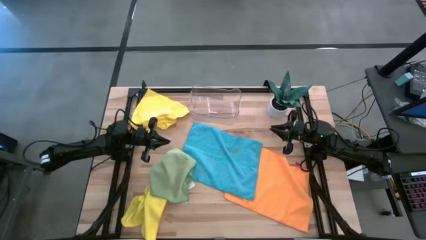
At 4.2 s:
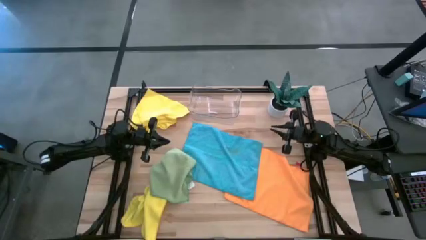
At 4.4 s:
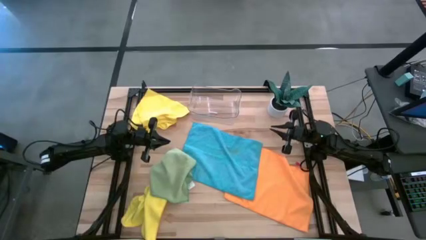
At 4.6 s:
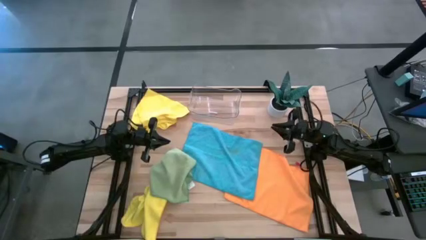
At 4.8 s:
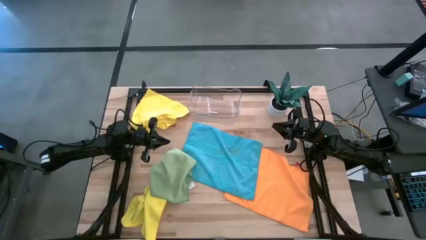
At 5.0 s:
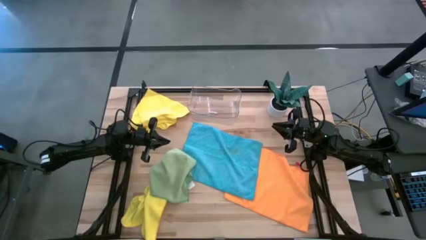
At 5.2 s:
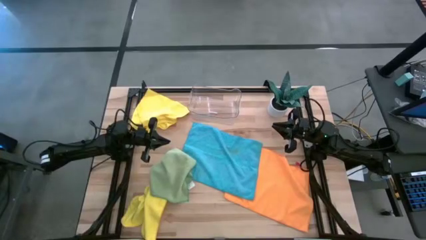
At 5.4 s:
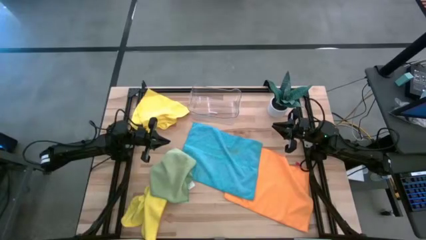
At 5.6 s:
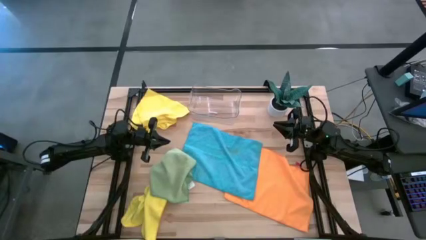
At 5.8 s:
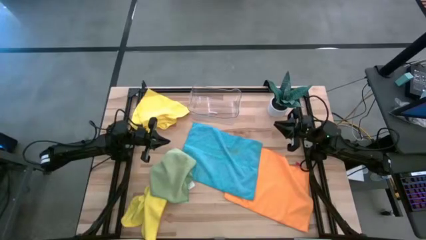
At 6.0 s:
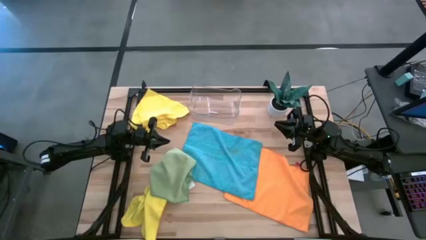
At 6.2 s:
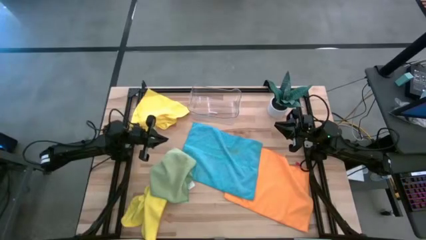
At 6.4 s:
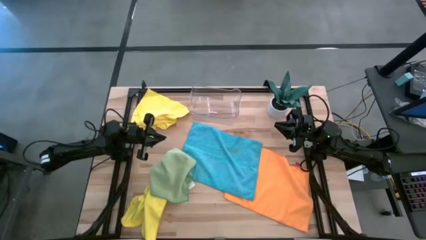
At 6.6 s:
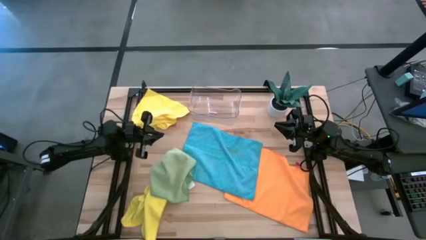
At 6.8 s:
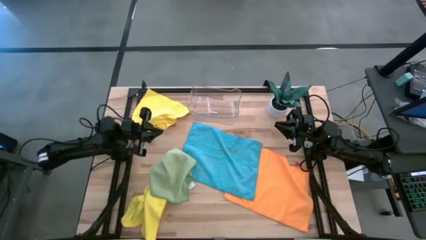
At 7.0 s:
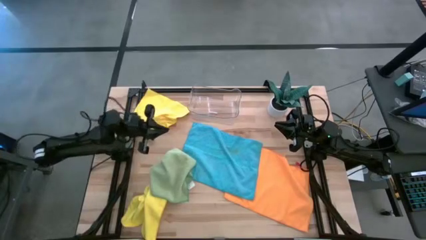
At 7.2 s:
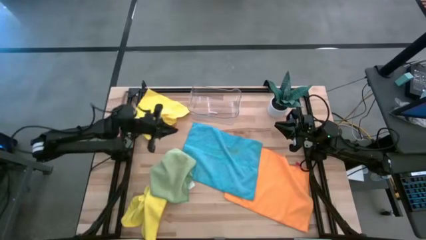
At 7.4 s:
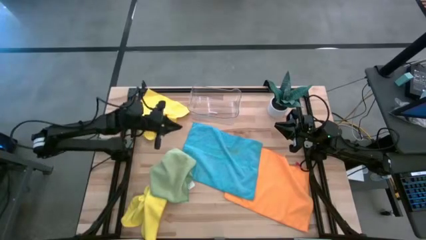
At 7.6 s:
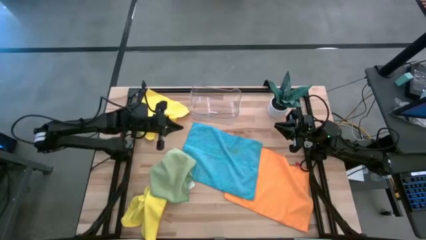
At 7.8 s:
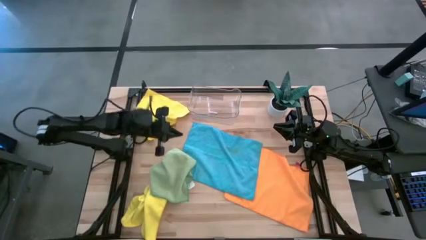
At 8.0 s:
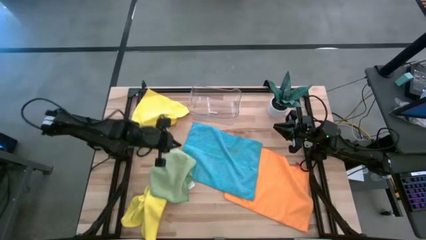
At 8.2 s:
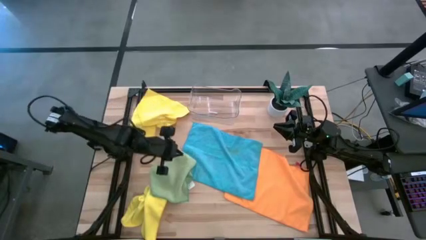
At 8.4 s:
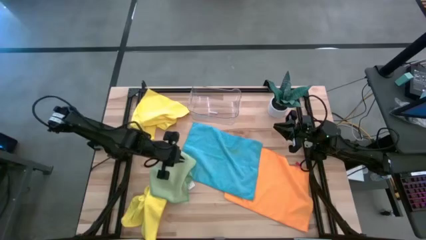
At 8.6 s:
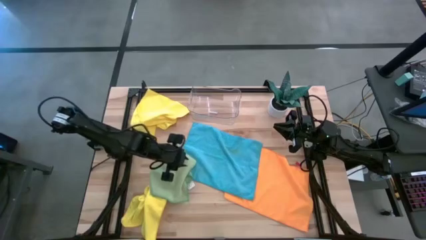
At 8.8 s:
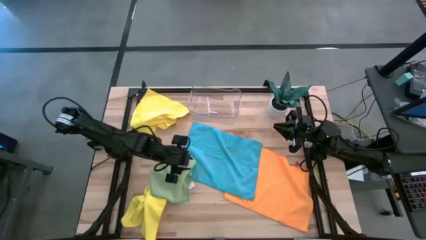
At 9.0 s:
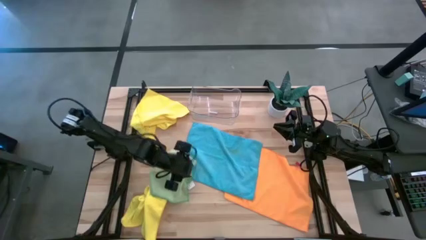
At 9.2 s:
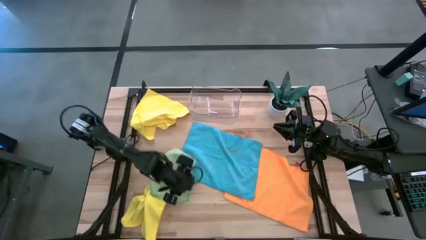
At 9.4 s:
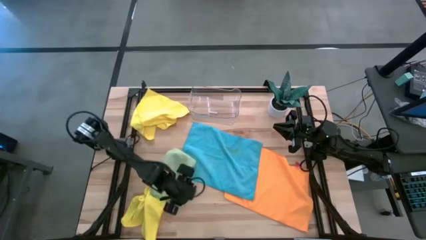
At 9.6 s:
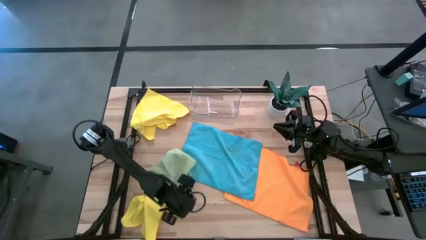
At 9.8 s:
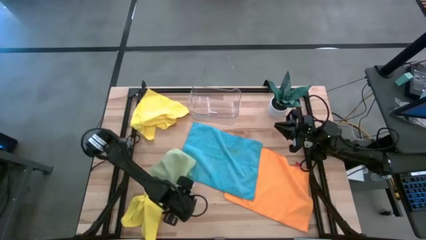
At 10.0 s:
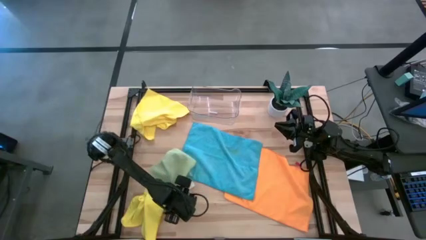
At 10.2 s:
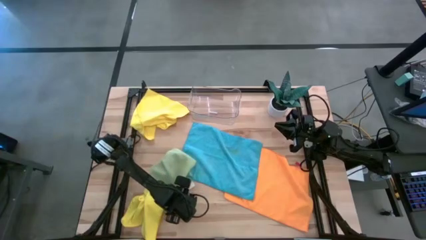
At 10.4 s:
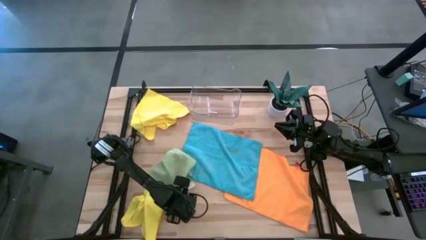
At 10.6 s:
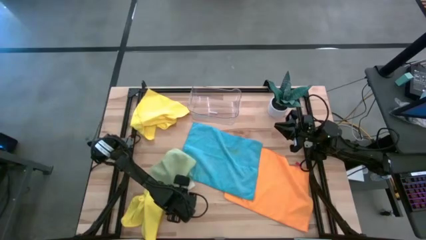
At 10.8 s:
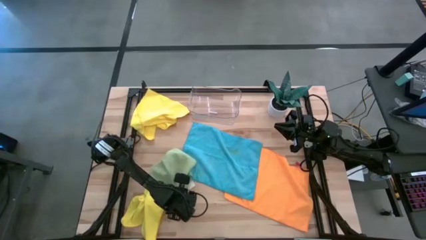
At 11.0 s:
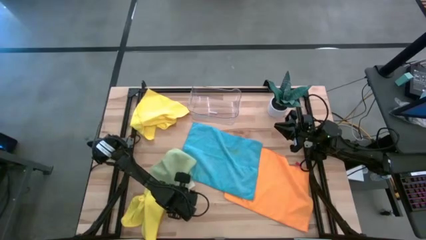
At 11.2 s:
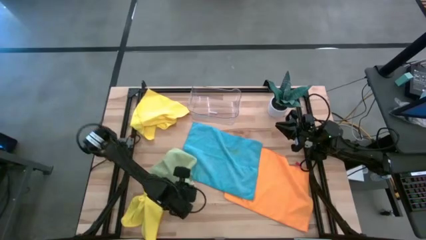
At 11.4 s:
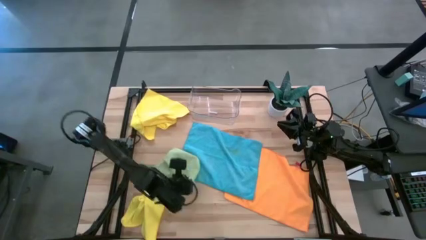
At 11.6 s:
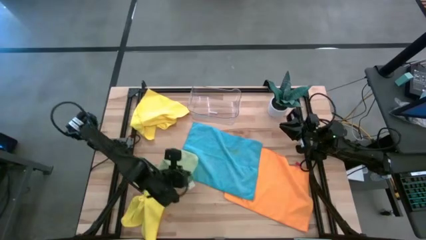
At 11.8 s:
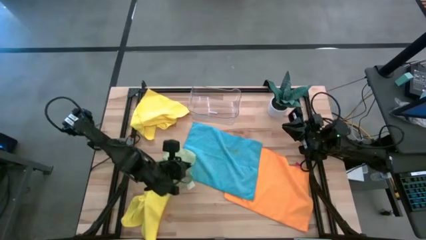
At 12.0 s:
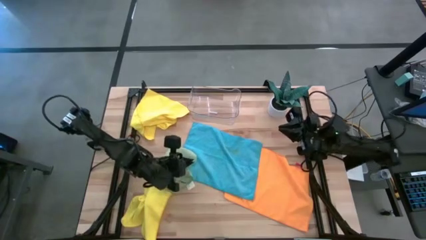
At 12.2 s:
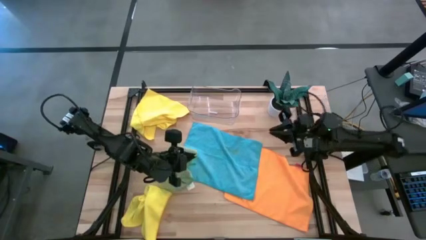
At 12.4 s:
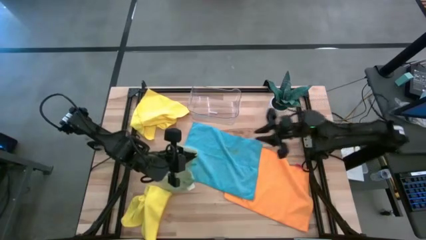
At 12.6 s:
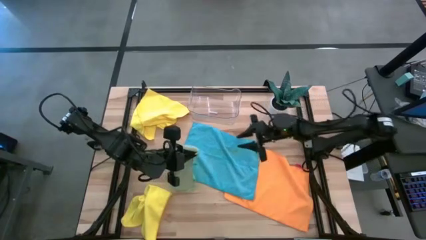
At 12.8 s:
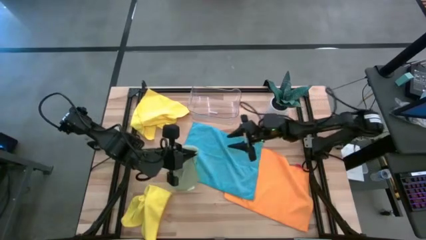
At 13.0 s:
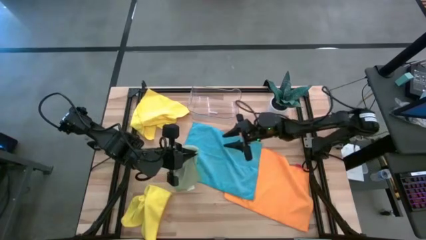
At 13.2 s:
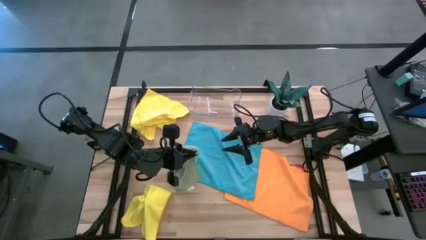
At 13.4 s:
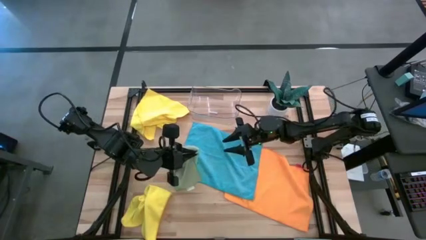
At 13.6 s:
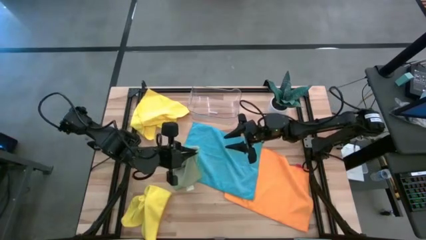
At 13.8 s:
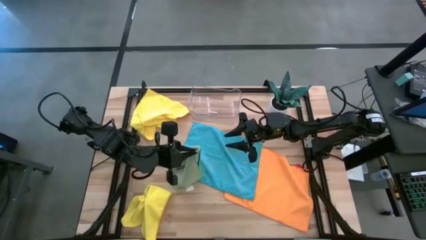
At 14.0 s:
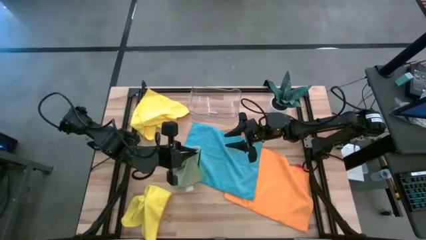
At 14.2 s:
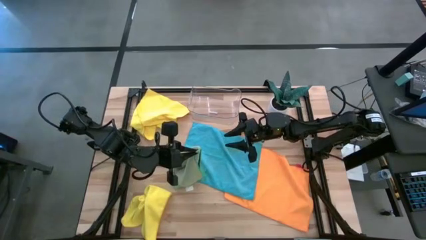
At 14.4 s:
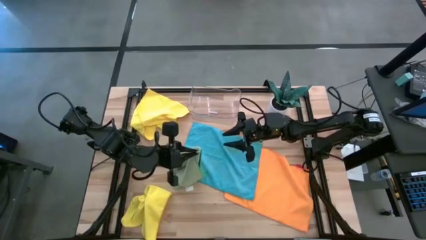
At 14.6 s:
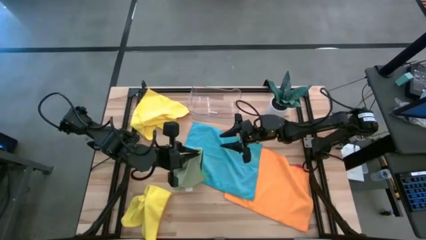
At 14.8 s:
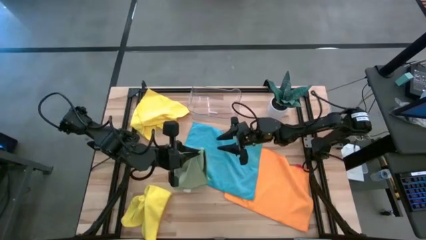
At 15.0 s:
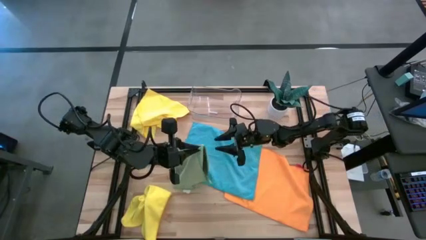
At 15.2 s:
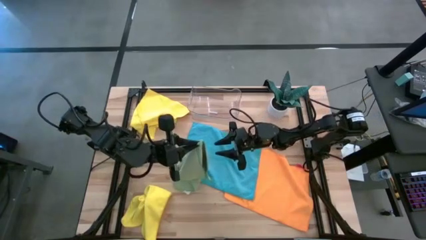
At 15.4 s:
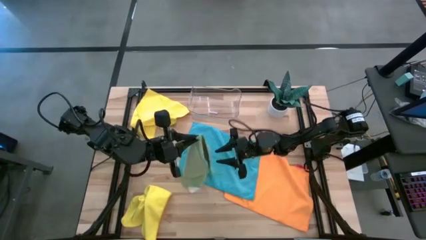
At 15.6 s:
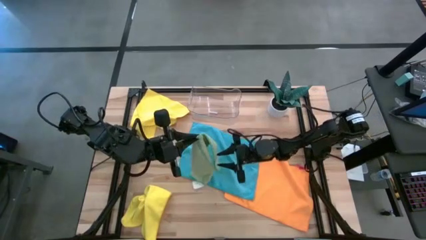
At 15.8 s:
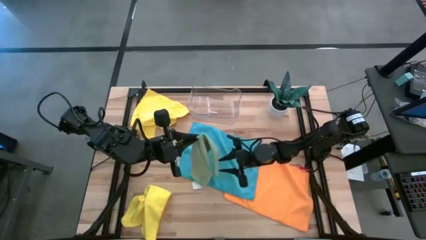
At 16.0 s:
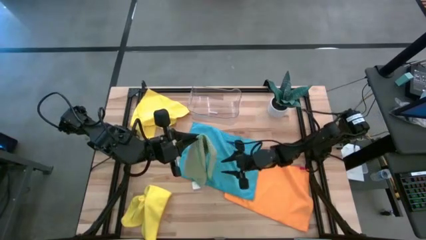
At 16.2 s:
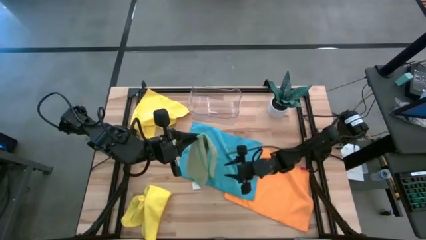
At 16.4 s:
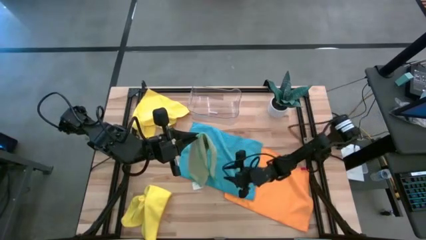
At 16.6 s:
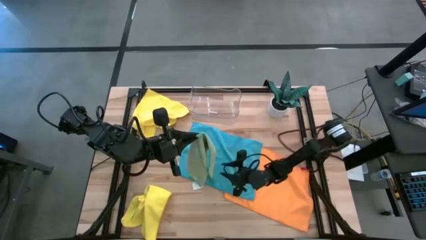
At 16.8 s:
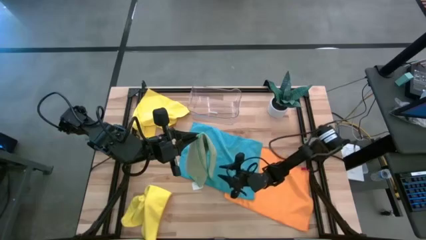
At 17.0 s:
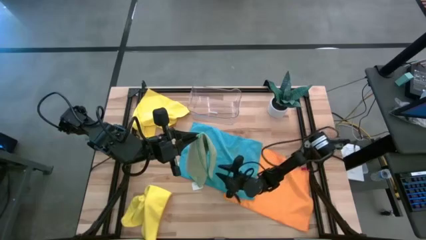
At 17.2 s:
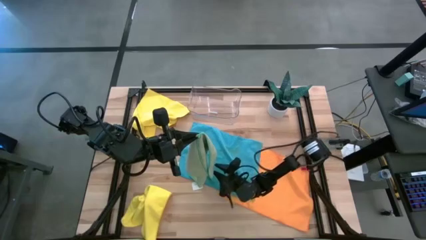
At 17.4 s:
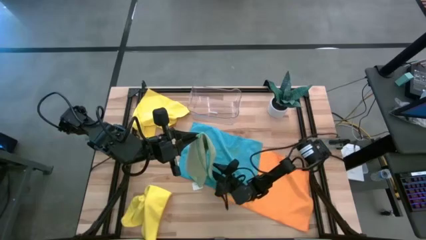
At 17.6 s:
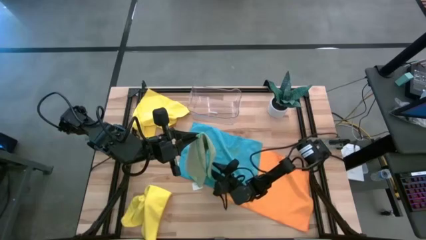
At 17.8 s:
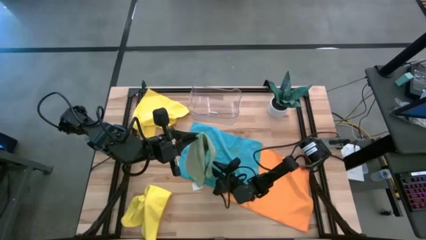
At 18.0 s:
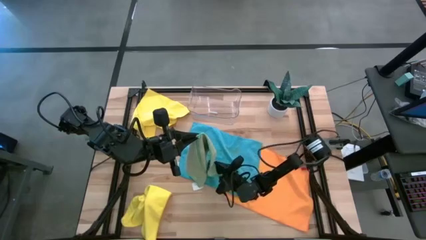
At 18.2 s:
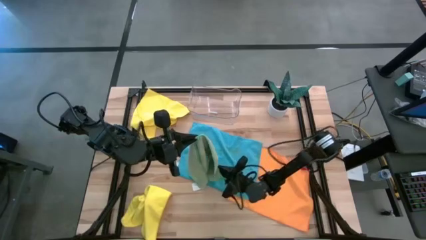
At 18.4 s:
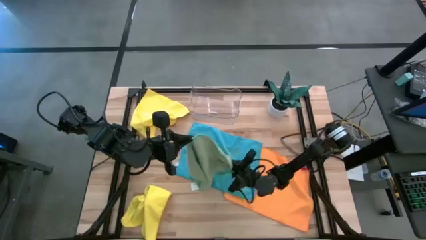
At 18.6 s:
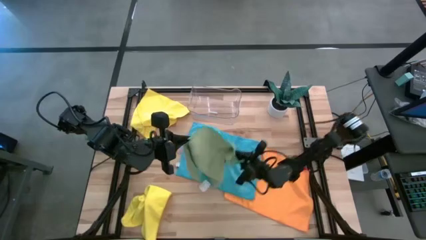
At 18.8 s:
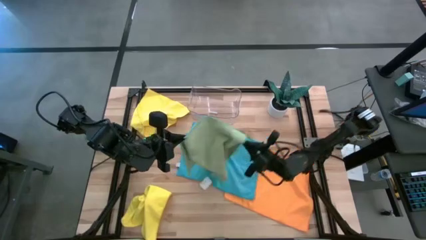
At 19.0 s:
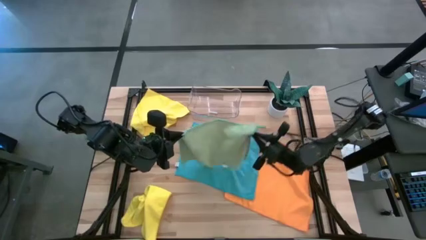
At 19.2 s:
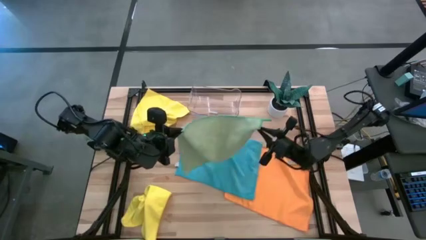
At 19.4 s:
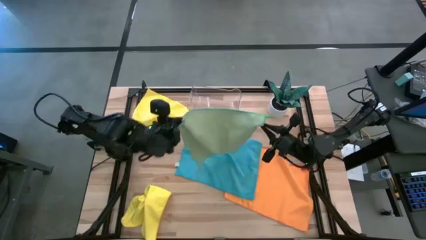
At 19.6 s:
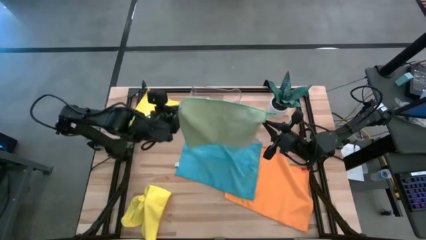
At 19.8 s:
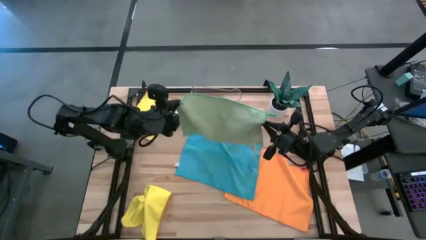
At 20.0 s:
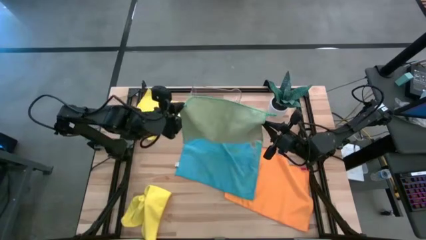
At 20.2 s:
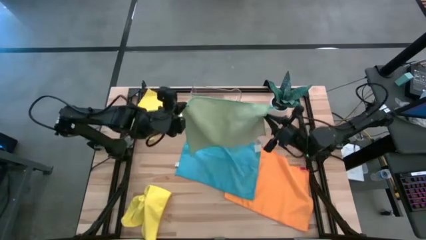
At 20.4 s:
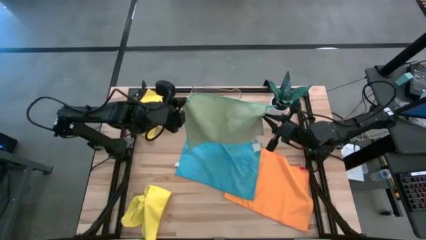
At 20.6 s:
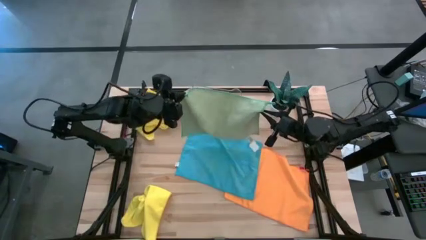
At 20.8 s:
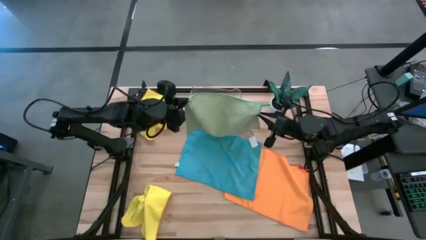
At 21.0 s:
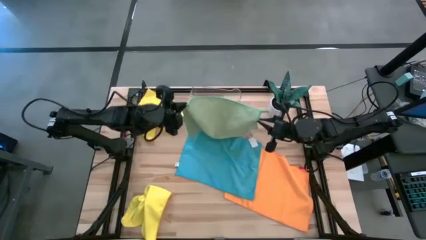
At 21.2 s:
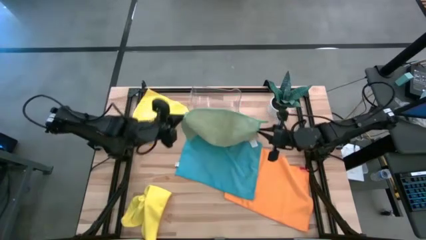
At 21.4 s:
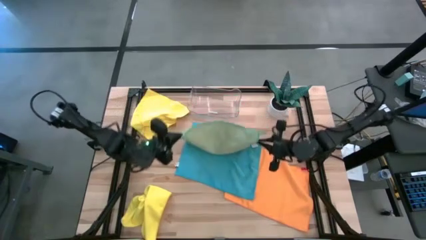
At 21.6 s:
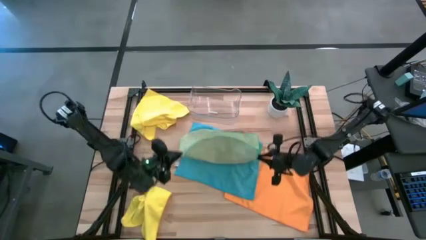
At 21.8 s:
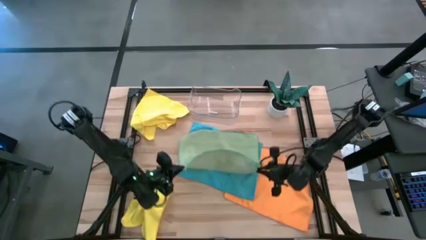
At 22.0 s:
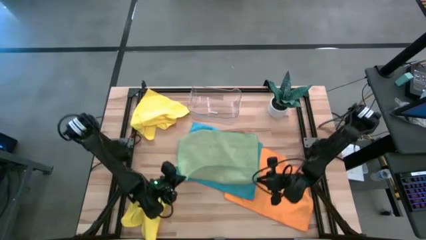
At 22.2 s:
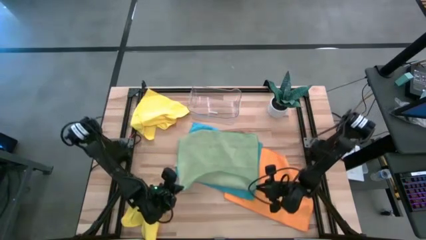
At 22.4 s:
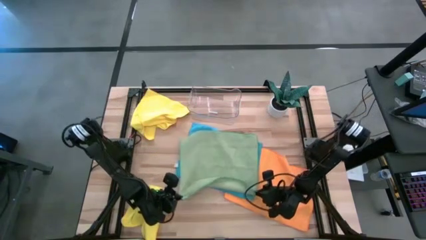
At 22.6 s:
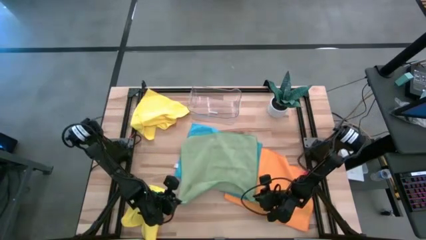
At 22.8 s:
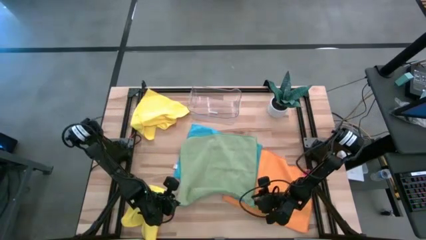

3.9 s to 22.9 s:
Task: Fold microfiber towels
Fold the green towel
